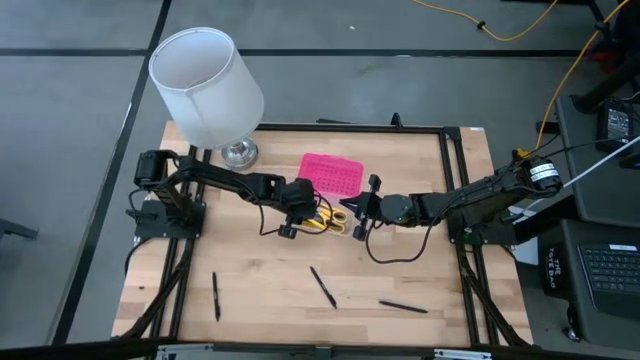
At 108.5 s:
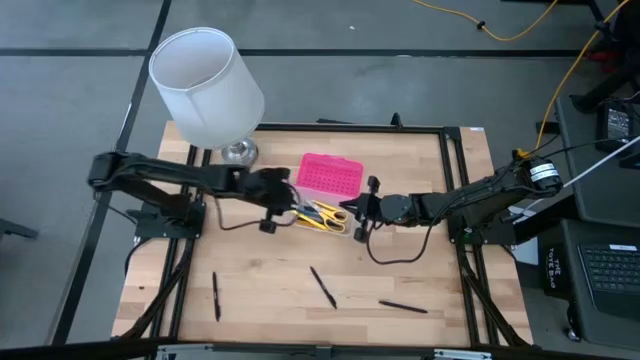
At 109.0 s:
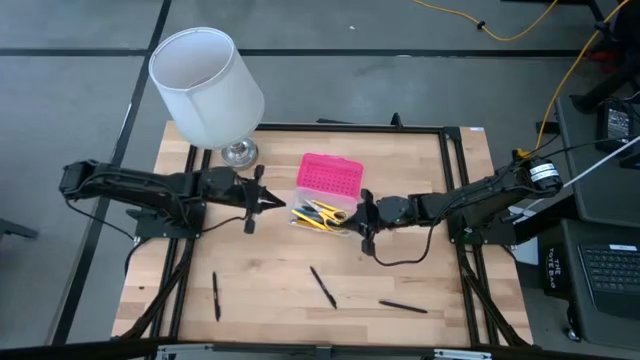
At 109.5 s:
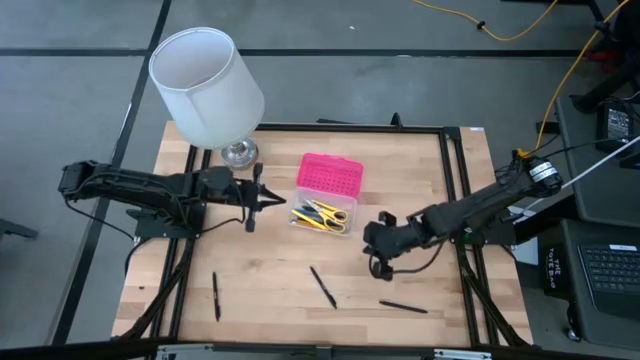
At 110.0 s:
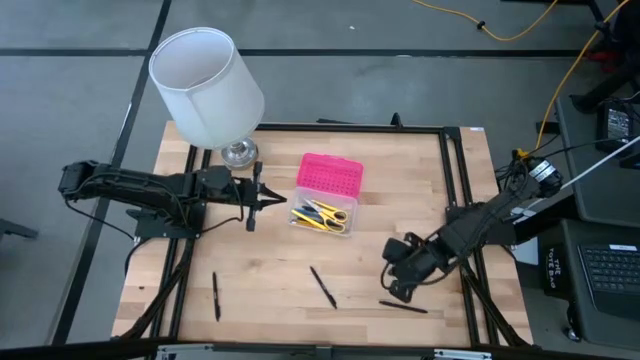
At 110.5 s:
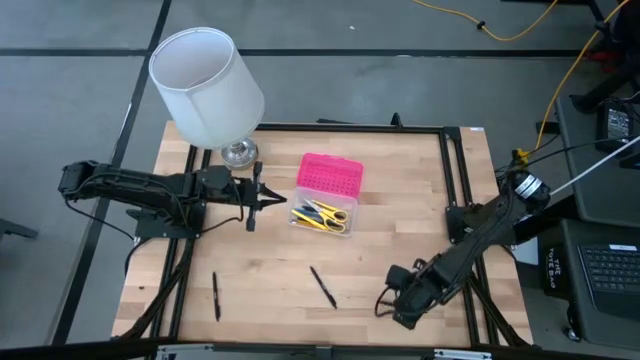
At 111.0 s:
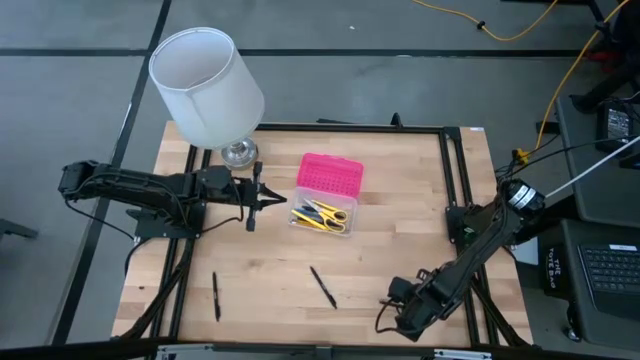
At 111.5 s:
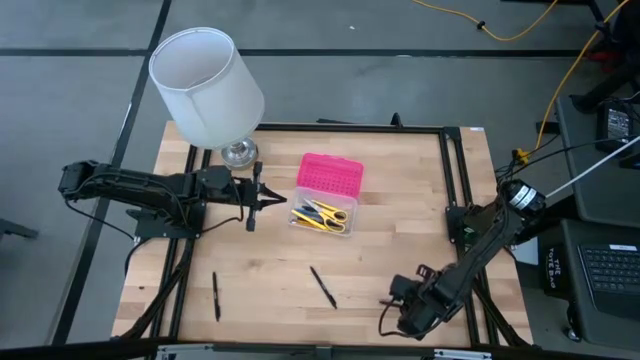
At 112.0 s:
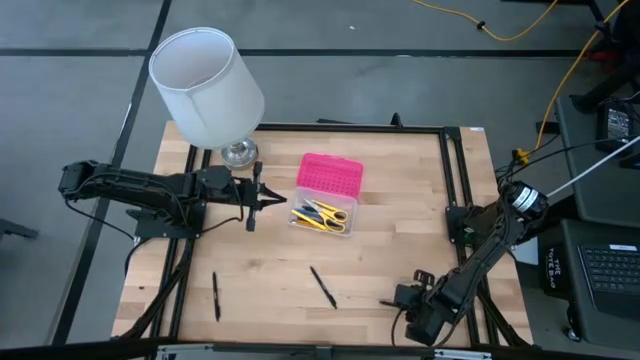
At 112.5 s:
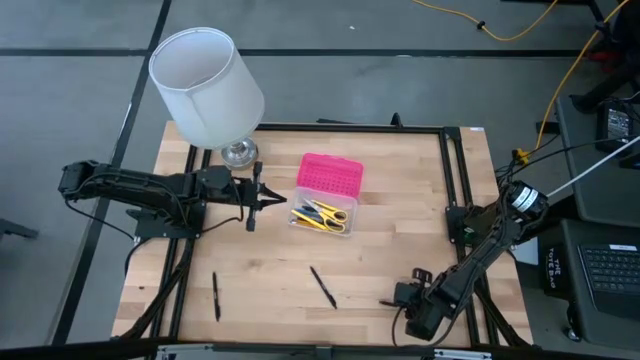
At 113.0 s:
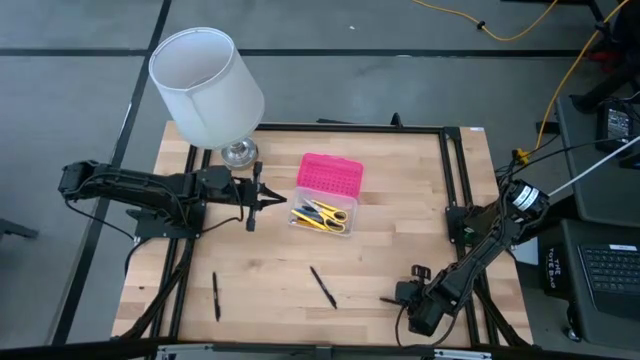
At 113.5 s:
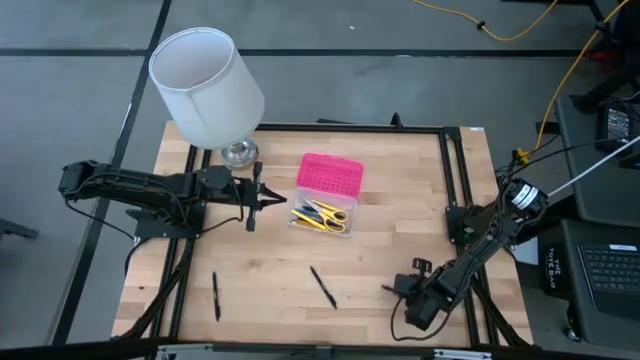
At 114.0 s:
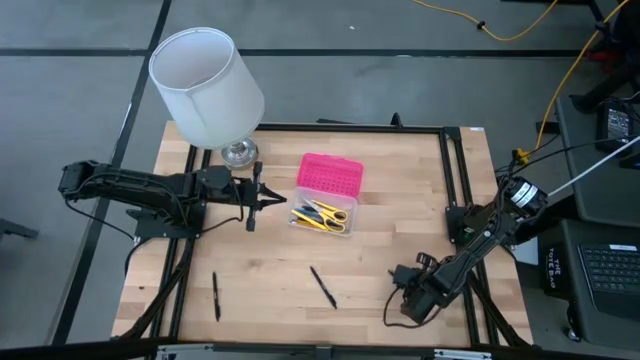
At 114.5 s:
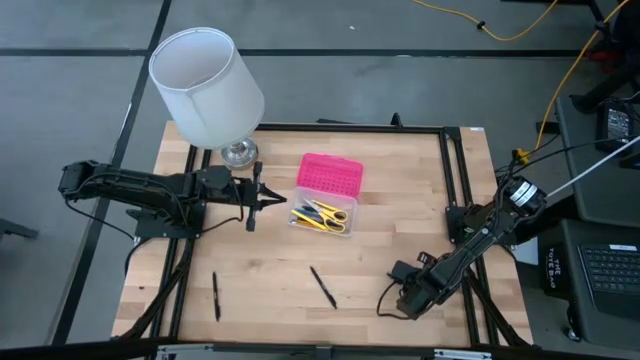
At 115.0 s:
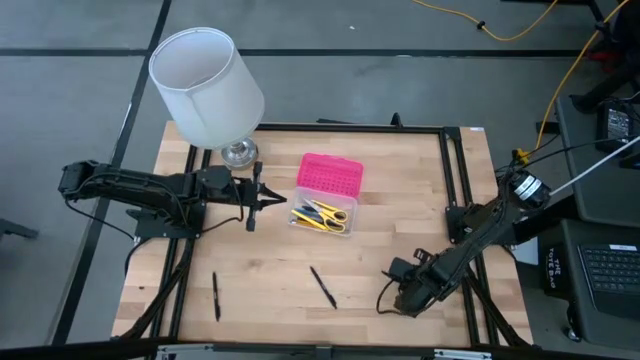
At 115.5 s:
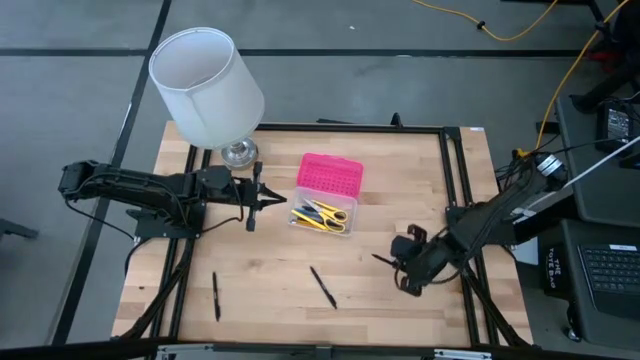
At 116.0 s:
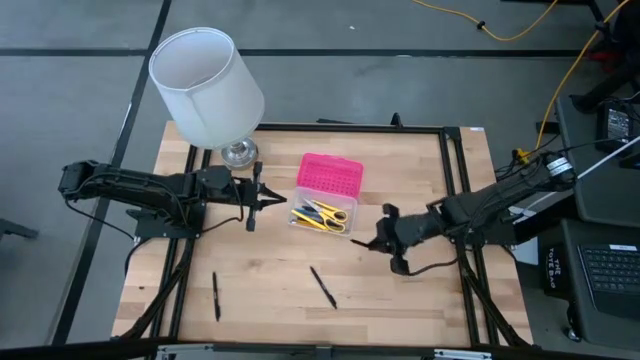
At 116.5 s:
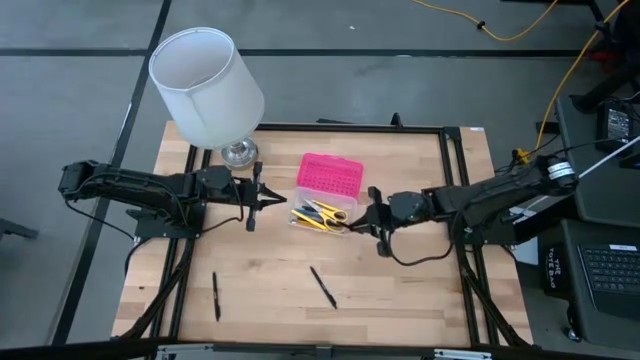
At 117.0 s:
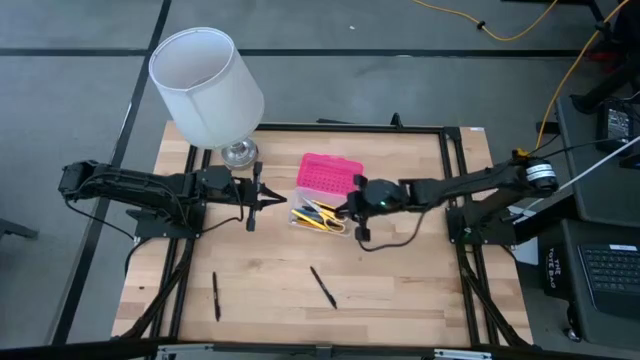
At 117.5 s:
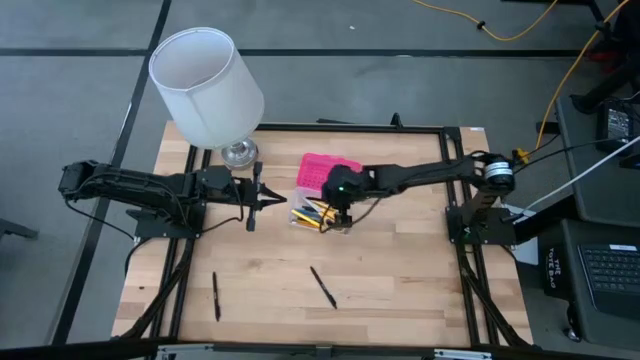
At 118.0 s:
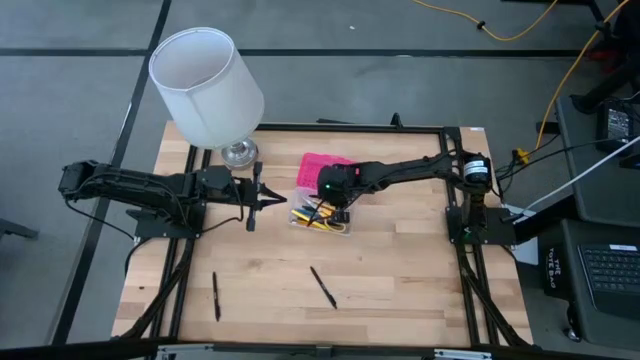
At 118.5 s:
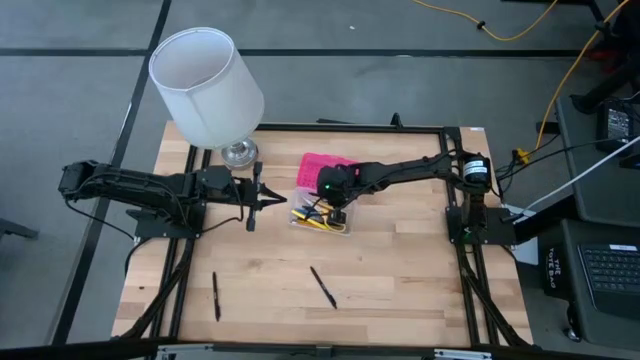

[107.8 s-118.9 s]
Task: Pick & place school supplies into a supply box
Put the black pen into the transparent supply box

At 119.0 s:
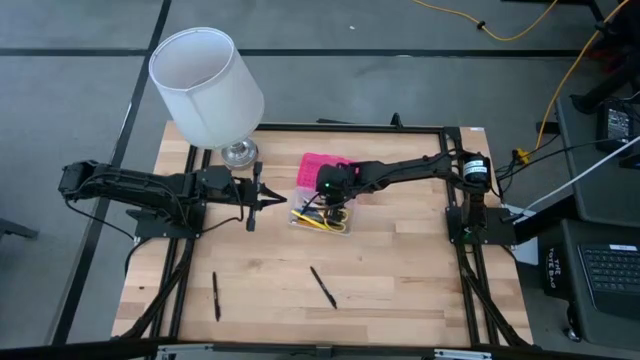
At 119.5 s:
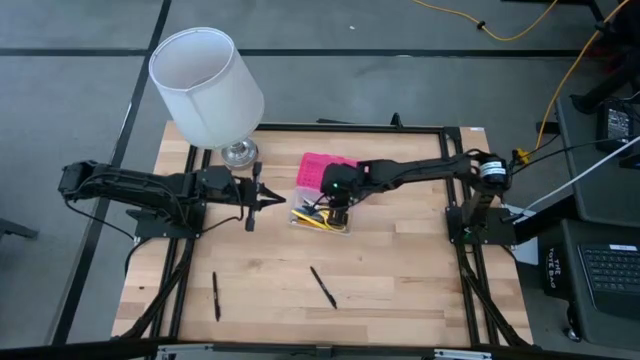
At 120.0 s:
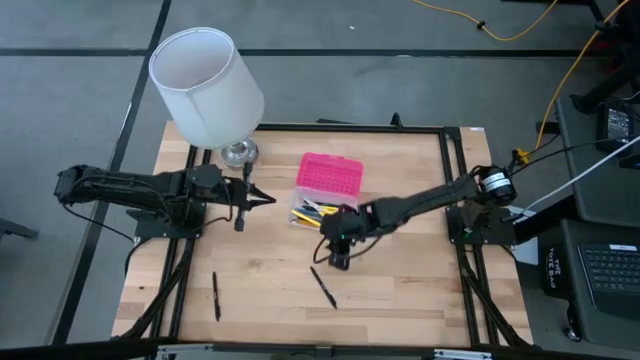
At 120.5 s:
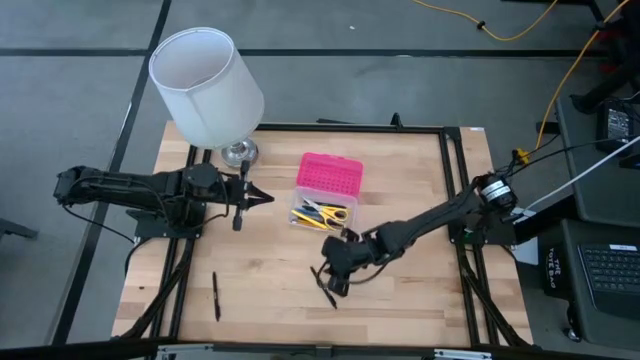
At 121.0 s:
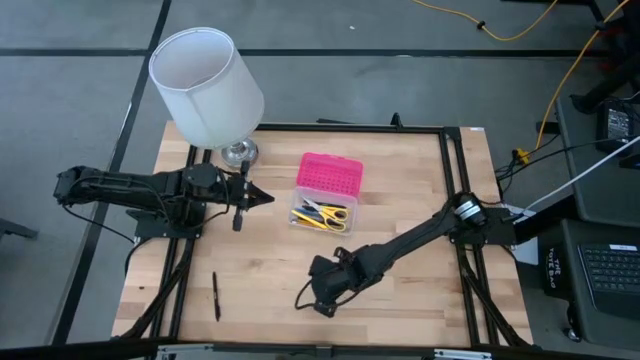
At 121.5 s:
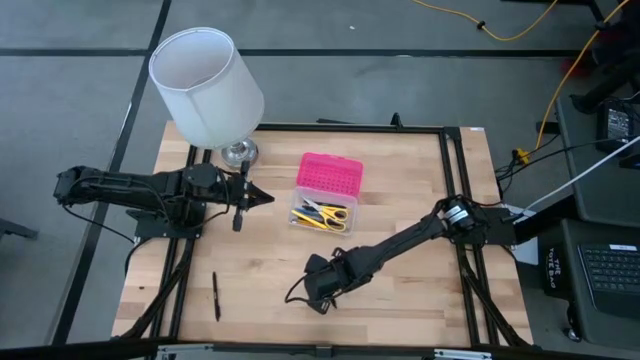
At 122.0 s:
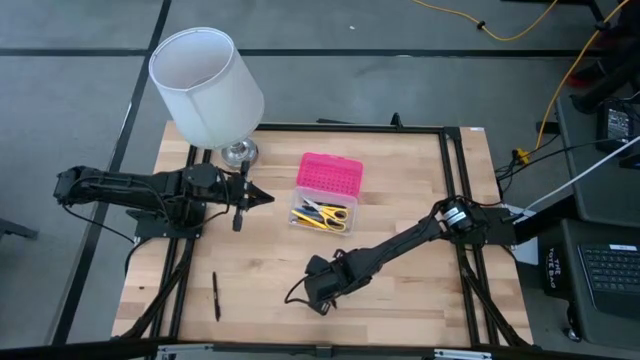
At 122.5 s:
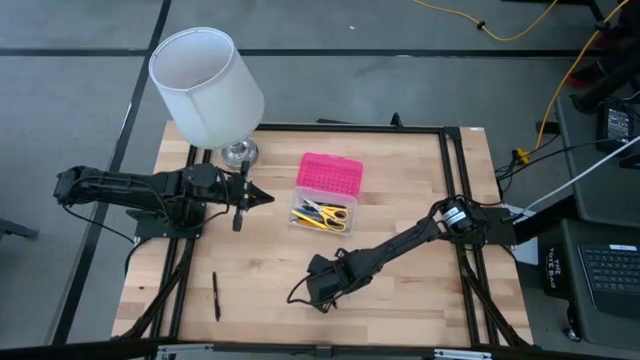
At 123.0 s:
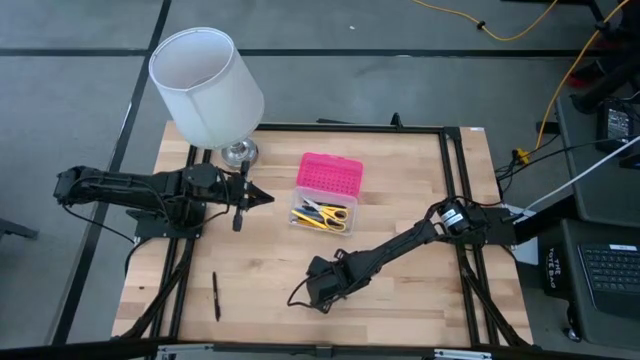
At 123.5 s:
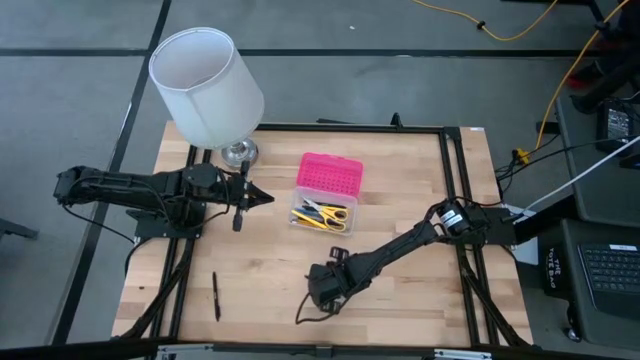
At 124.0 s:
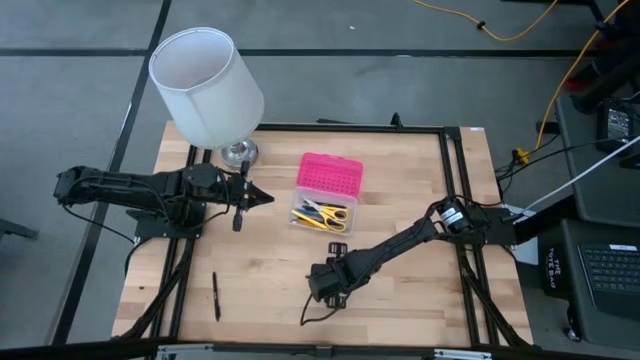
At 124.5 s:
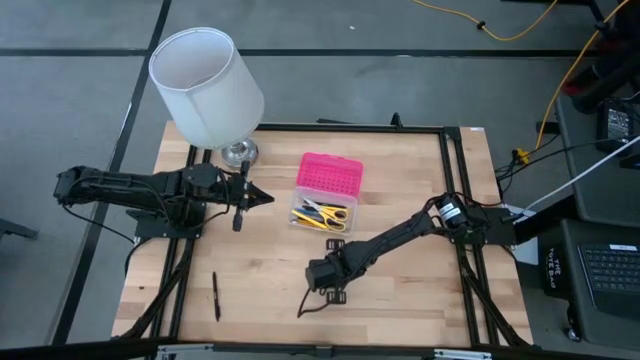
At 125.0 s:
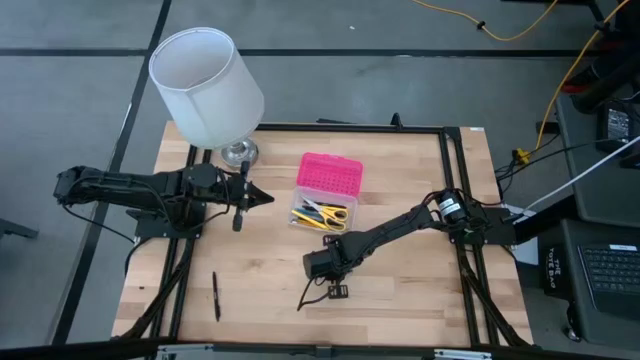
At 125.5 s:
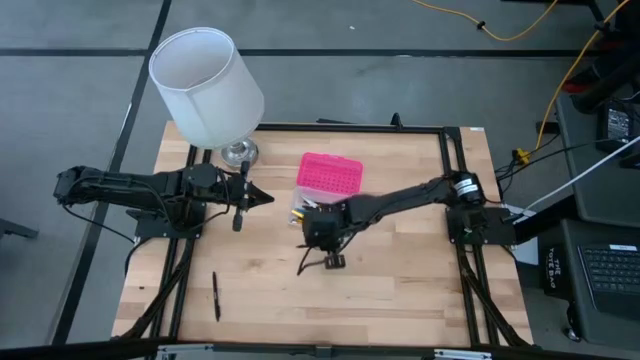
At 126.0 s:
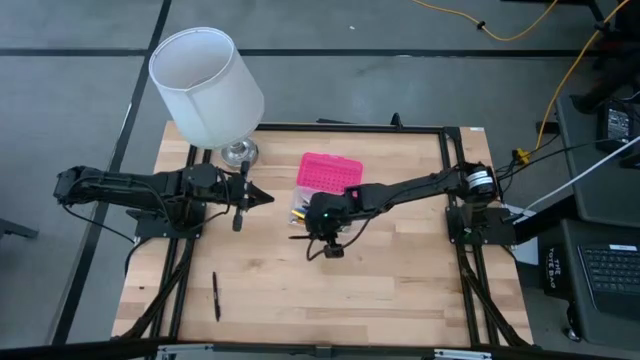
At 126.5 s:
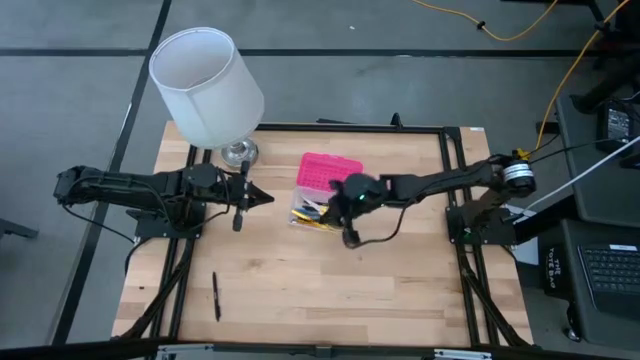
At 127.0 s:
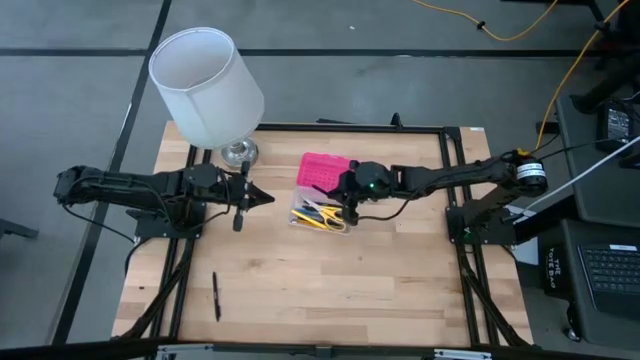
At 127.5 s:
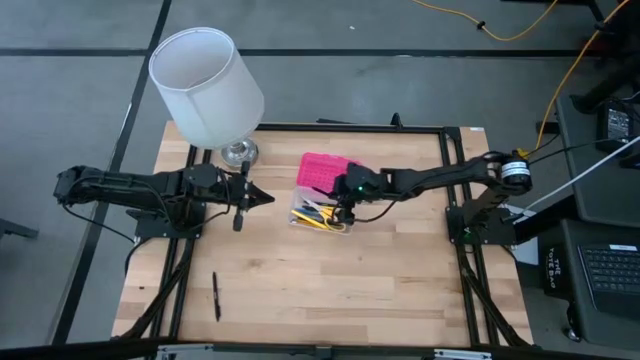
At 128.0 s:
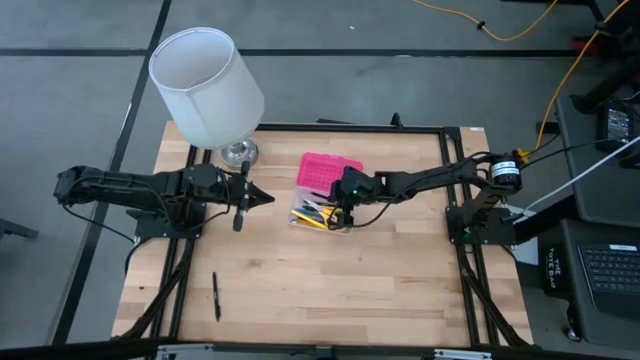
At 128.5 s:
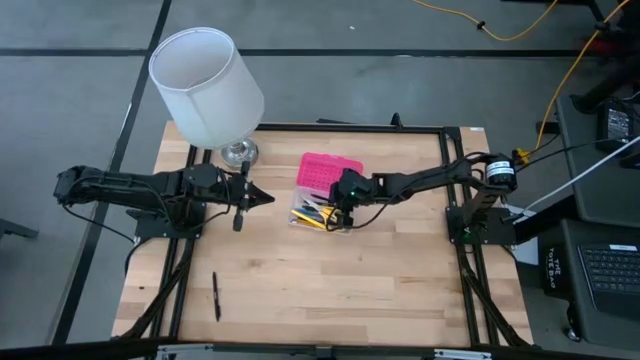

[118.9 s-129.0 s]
Put the black pen into the transparent supply box
